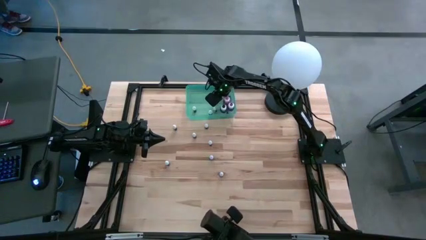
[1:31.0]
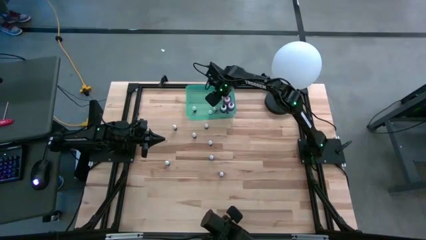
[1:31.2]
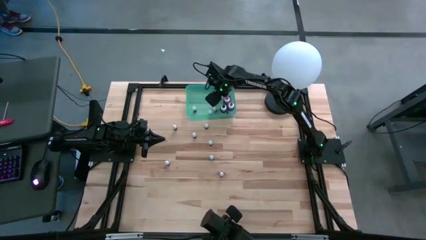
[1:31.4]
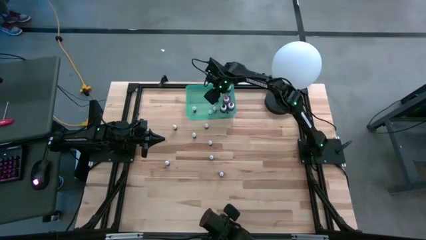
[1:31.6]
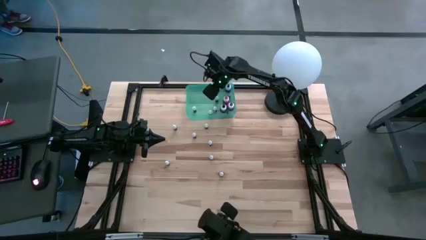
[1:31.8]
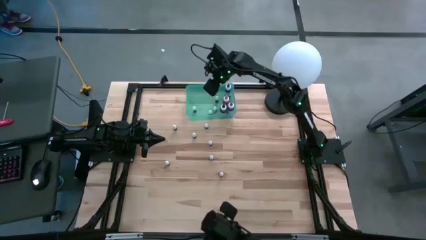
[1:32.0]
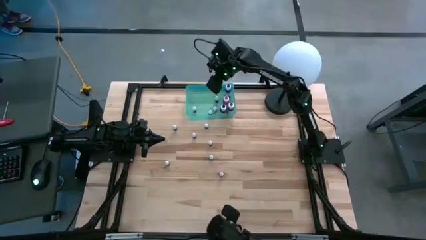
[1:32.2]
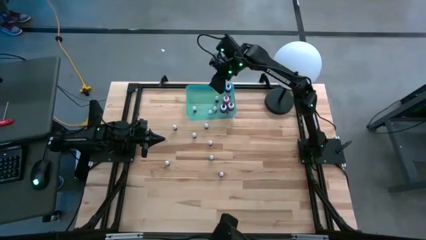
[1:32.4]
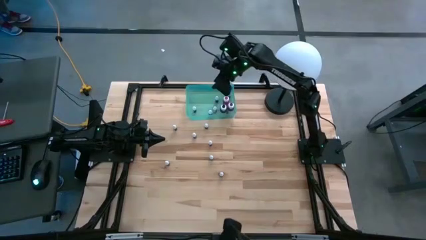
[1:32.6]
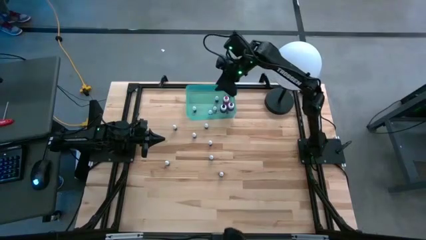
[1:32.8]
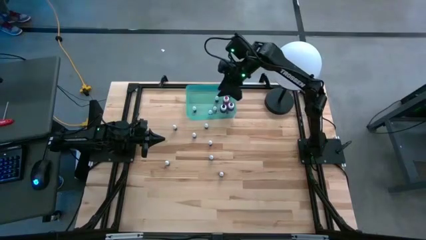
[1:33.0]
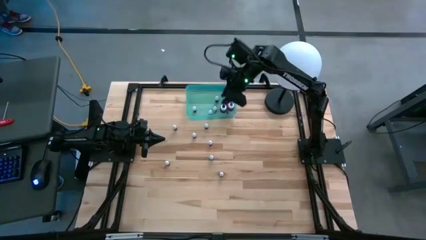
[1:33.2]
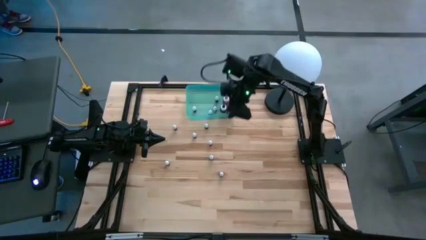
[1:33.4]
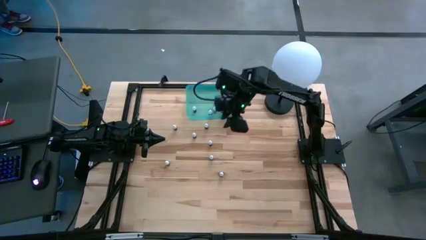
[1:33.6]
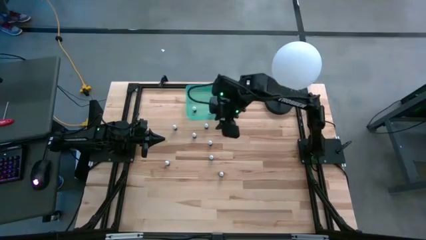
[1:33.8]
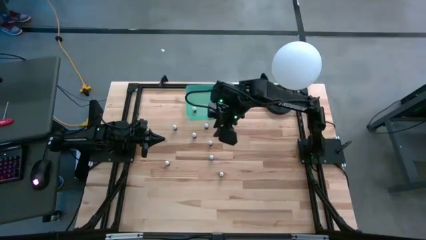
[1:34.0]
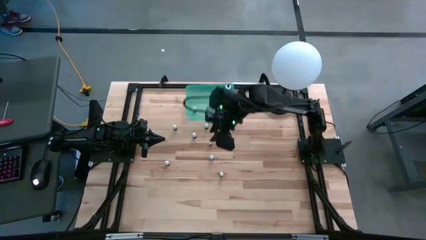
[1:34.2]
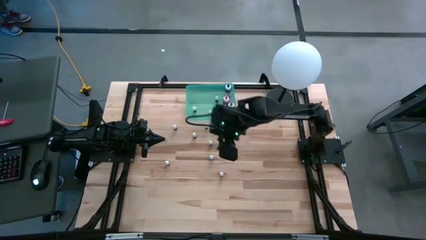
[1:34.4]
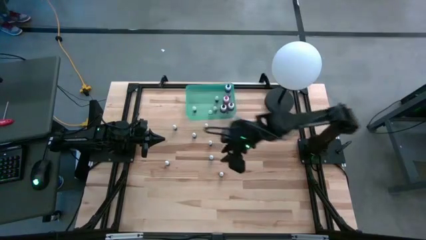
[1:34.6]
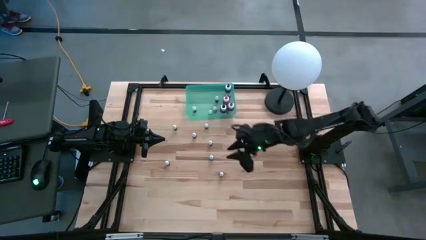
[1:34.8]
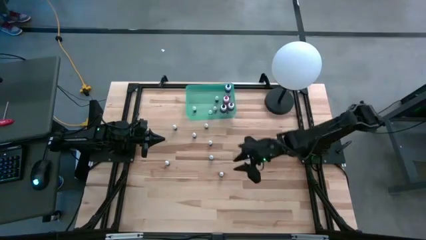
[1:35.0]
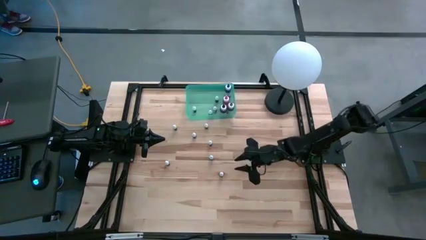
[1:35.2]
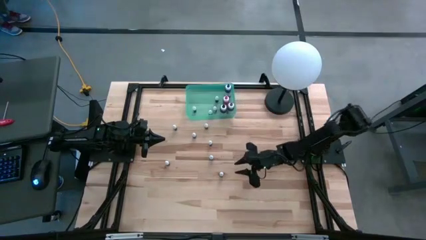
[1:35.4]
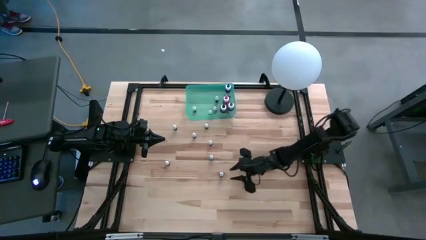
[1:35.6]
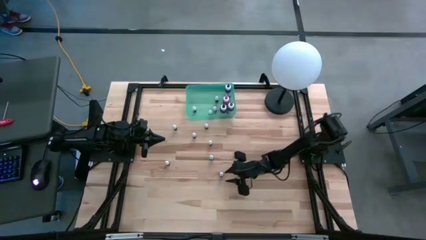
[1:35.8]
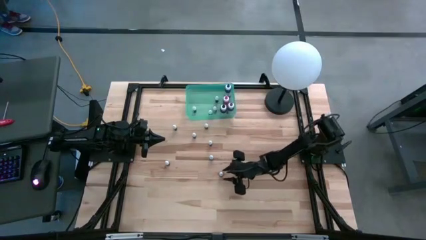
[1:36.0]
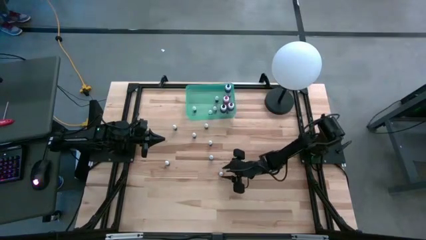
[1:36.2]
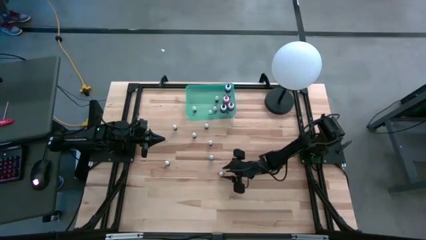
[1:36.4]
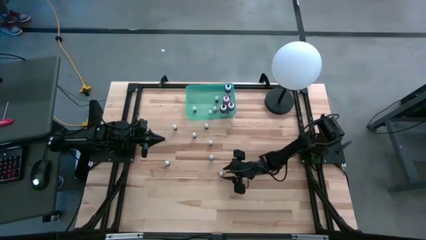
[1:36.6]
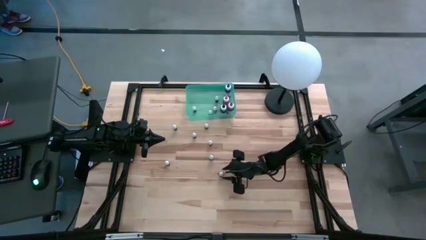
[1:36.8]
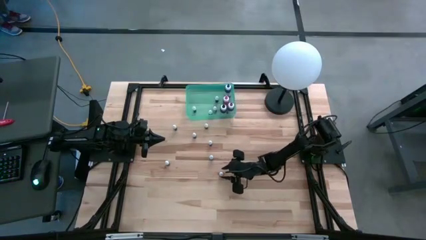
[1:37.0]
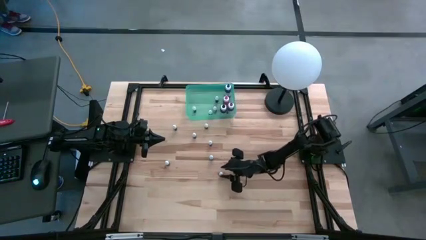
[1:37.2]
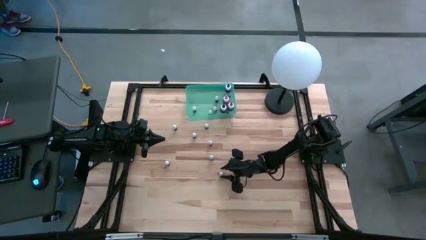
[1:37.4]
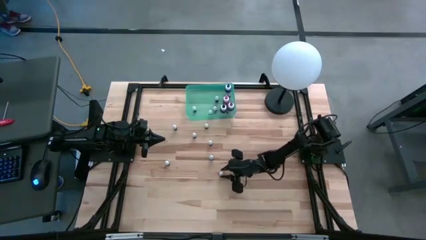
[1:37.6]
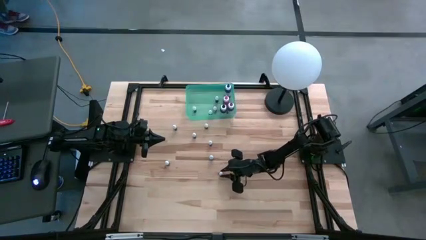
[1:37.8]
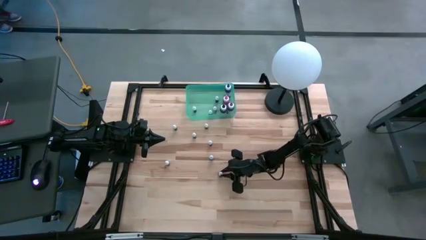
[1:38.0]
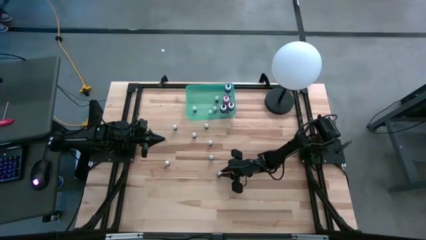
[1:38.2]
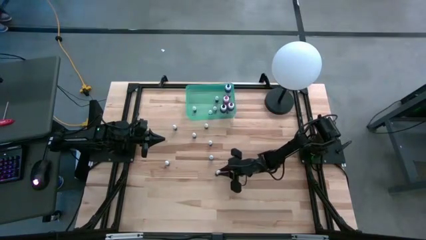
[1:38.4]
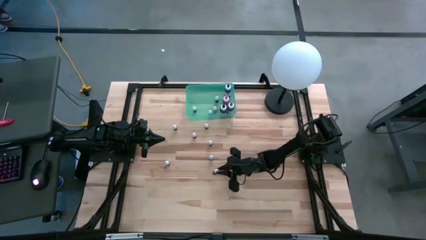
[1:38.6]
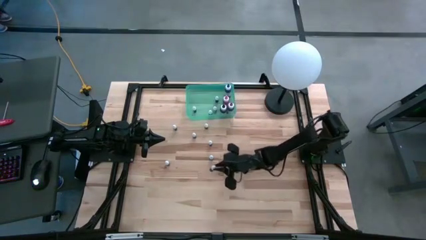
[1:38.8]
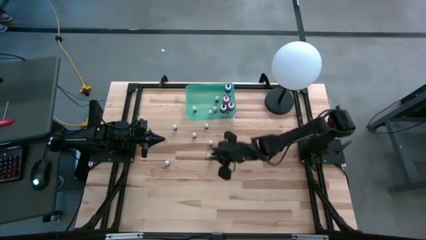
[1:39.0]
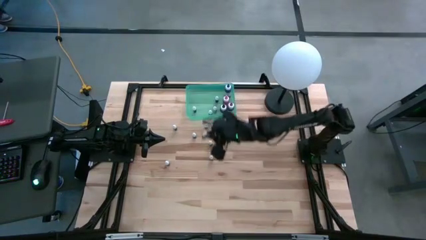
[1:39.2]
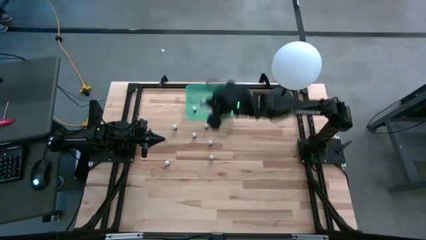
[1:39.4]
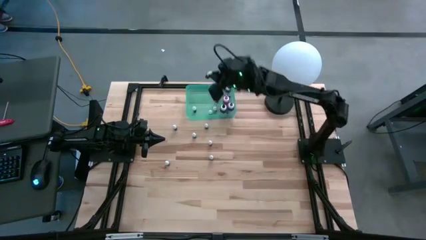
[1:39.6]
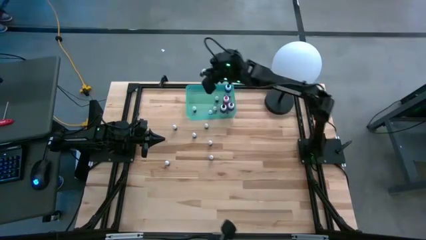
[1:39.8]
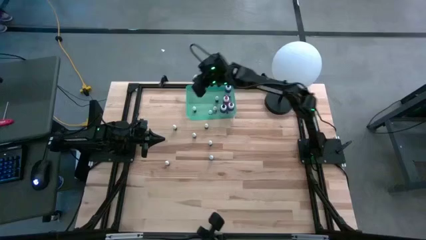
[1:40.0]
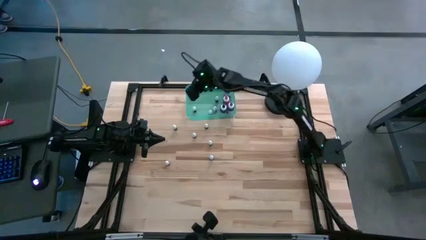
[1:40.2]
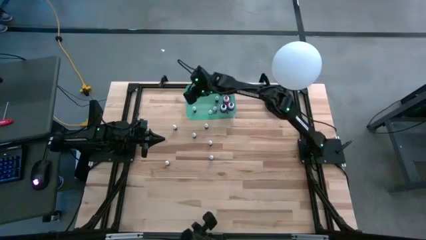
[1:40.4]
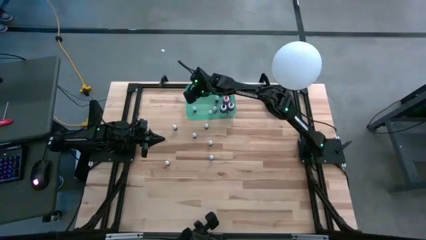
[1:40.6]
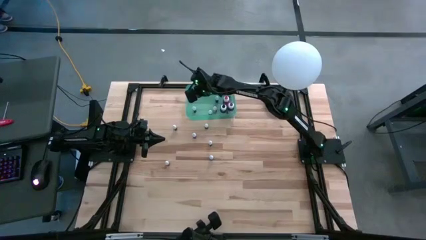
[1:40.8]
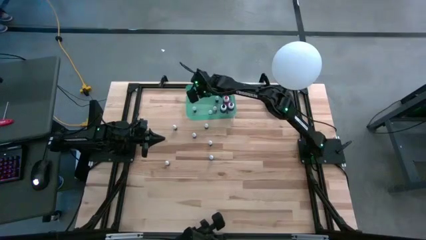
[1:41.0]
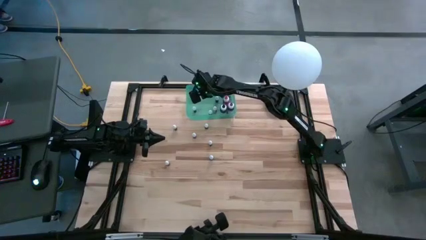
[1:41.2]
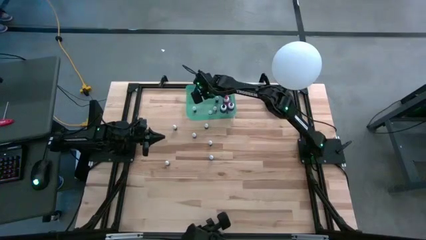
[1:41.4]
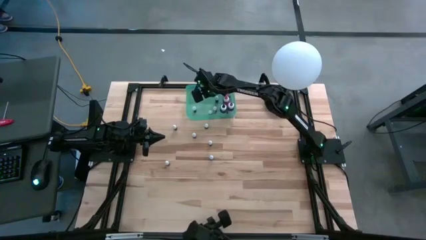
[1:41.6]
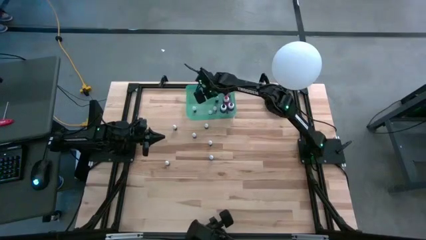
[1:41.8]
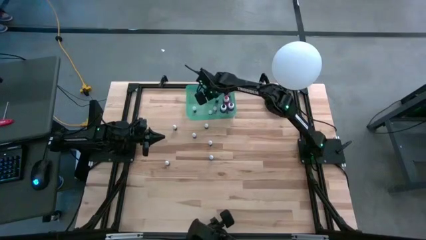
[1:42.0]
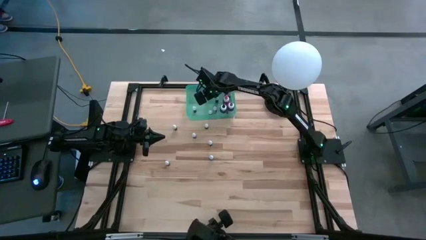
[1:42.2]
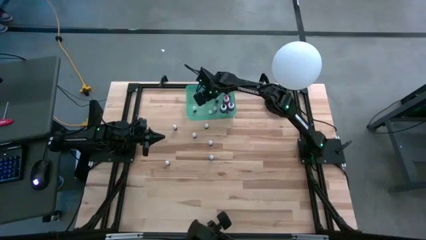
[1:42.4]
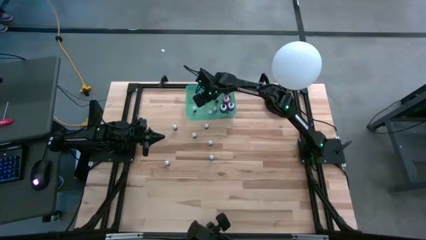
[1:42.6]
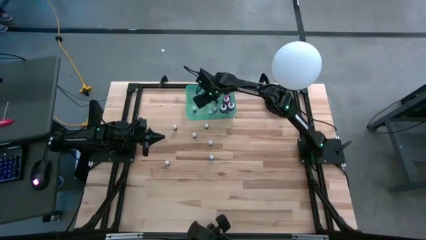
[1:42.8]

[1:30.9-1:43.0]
Task: Pick & Place food coloring
Put the small black food coloring into the bin
